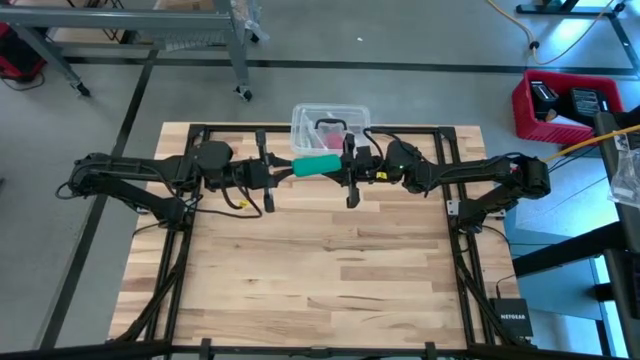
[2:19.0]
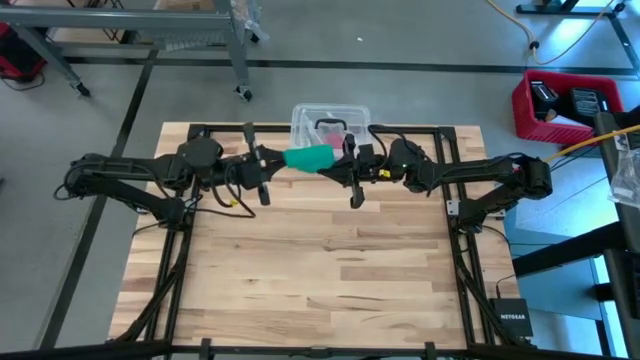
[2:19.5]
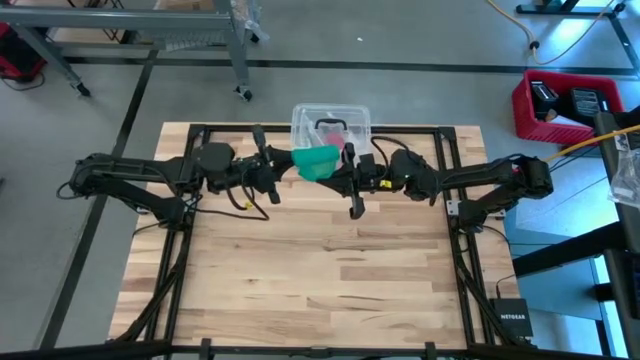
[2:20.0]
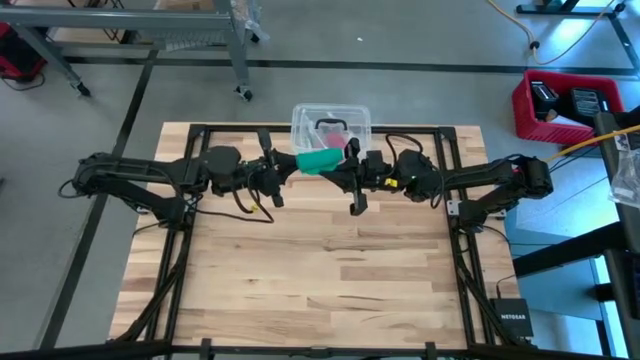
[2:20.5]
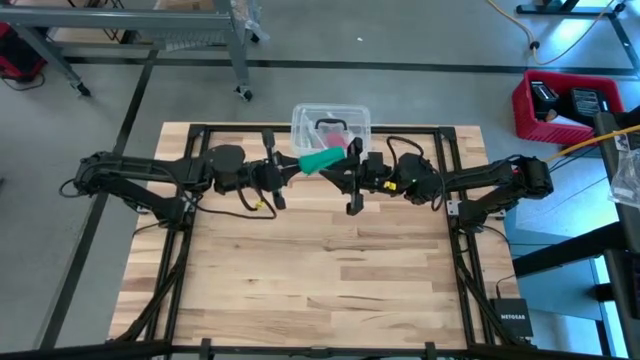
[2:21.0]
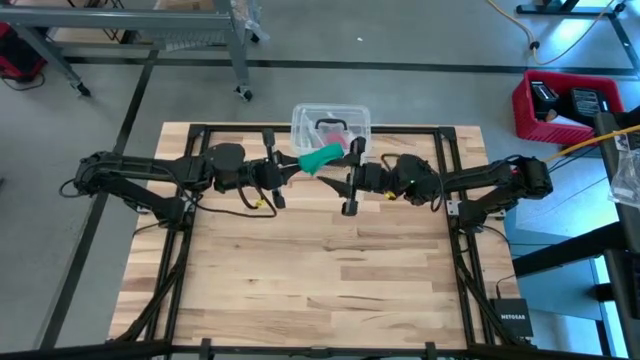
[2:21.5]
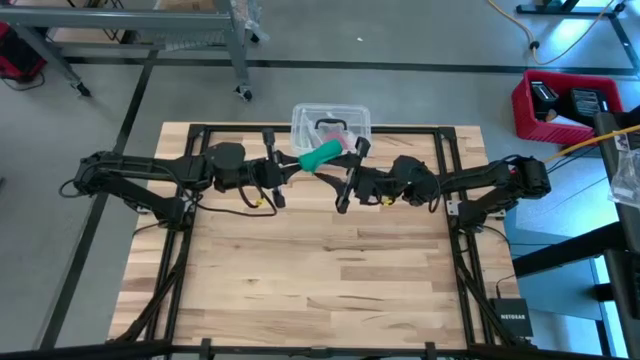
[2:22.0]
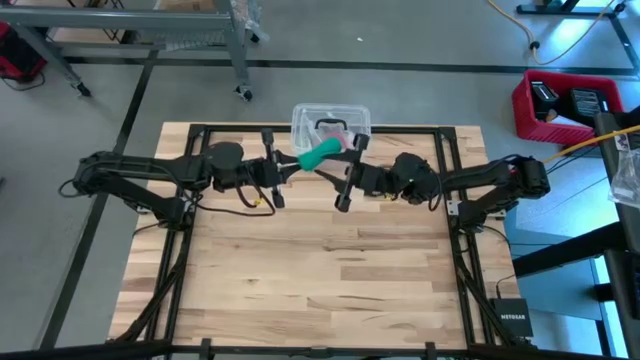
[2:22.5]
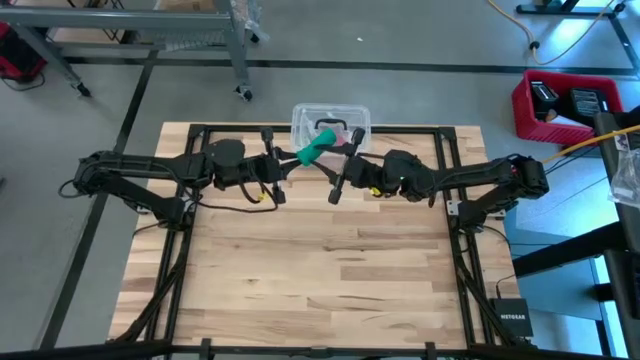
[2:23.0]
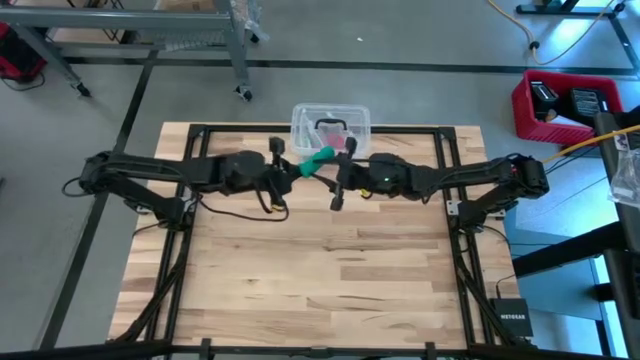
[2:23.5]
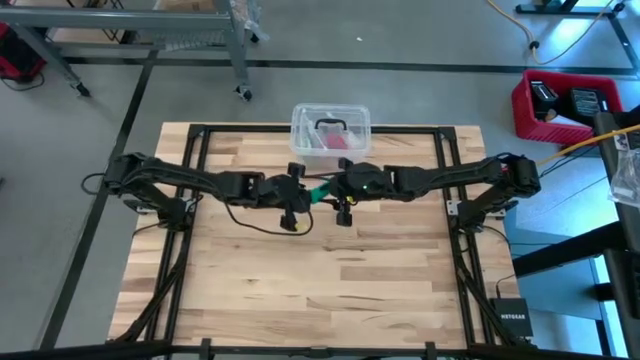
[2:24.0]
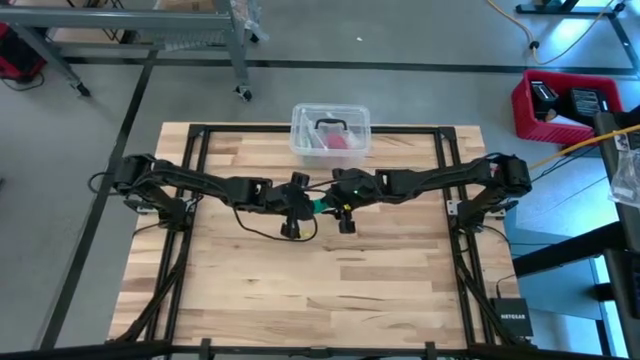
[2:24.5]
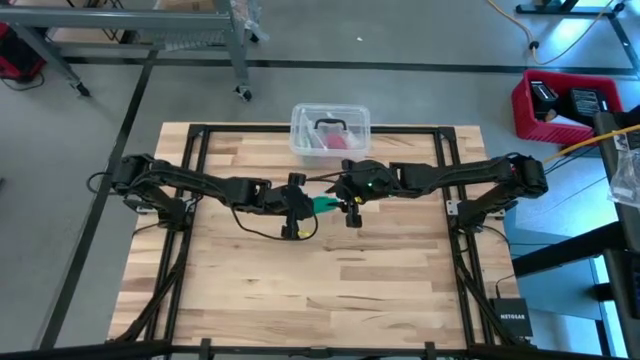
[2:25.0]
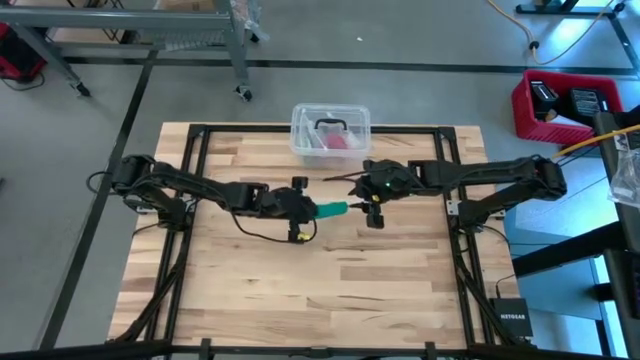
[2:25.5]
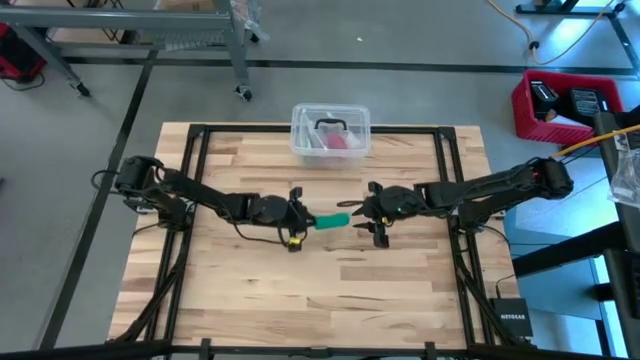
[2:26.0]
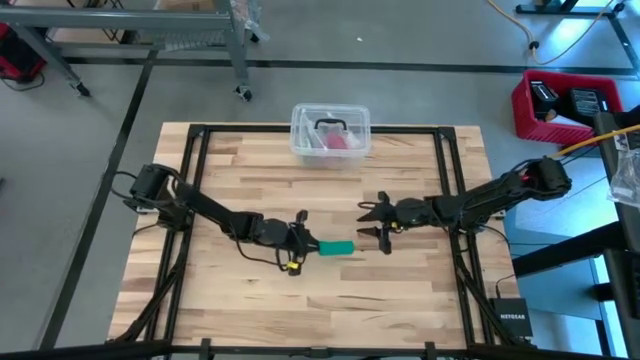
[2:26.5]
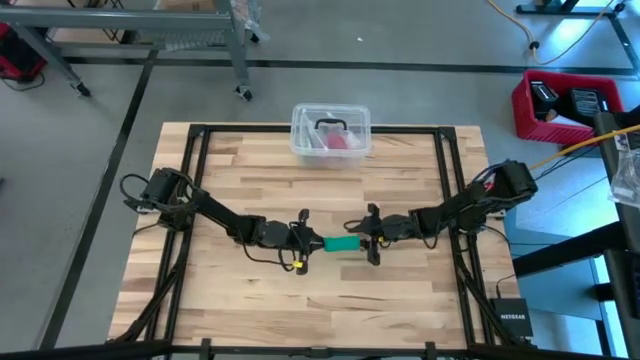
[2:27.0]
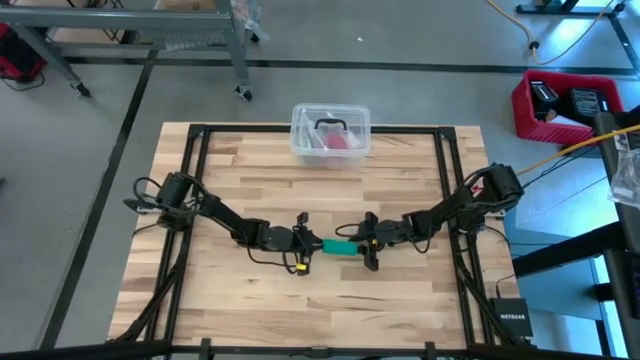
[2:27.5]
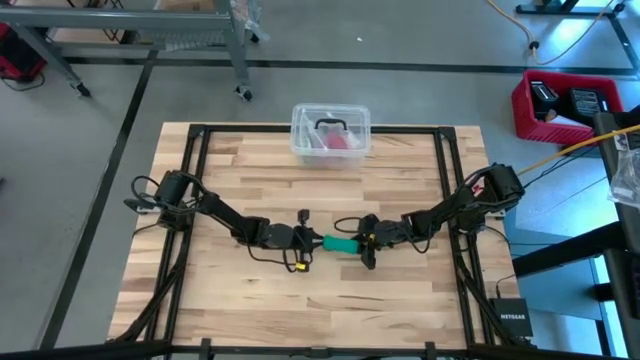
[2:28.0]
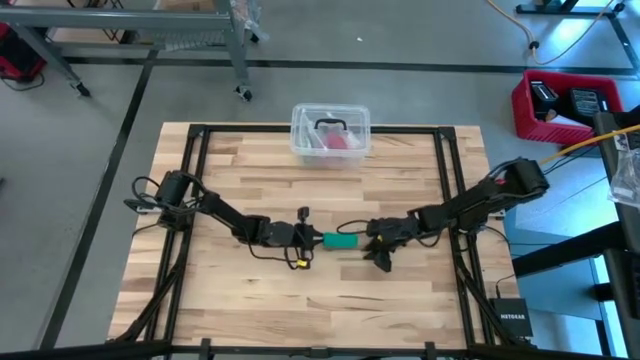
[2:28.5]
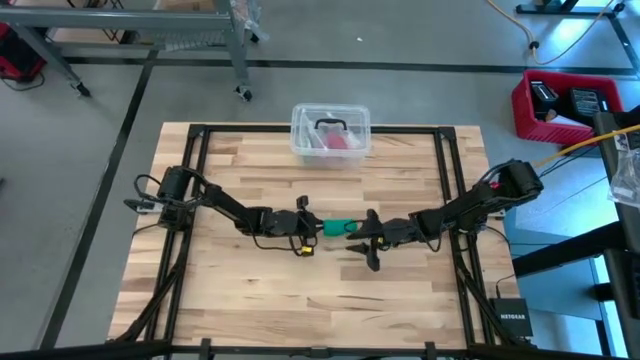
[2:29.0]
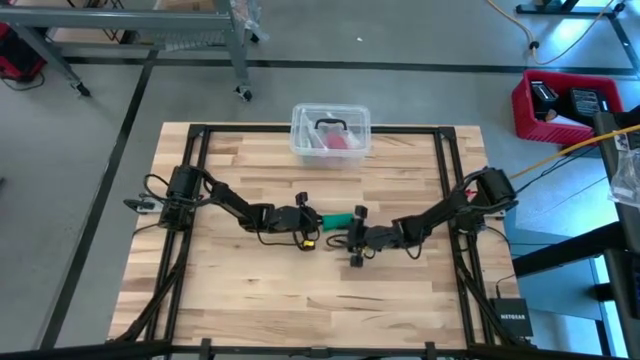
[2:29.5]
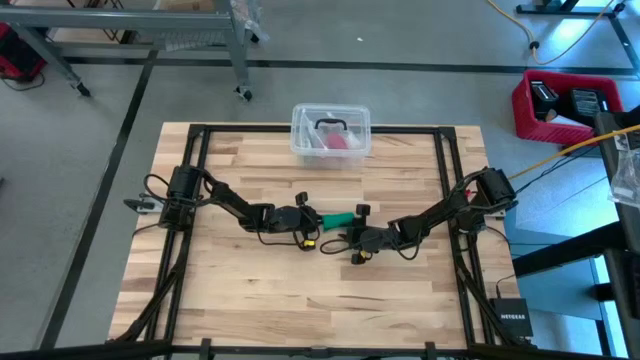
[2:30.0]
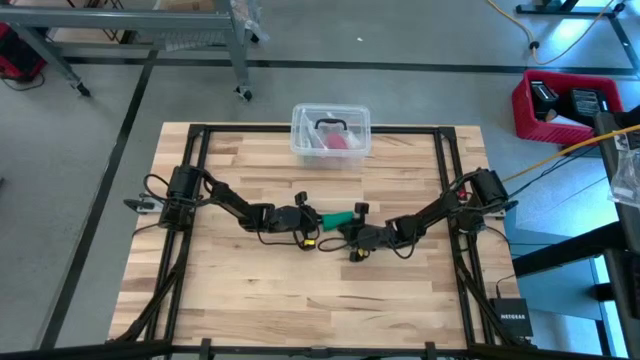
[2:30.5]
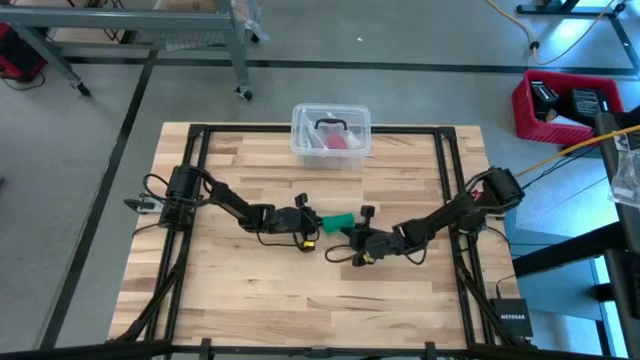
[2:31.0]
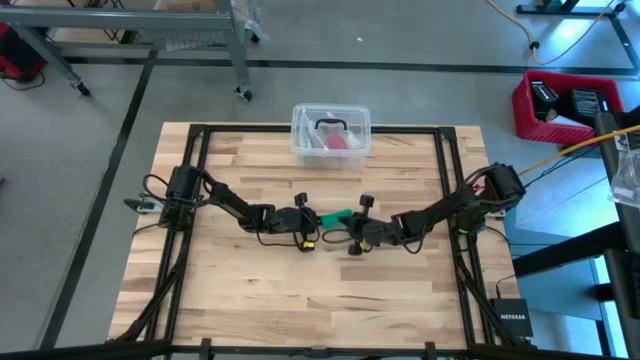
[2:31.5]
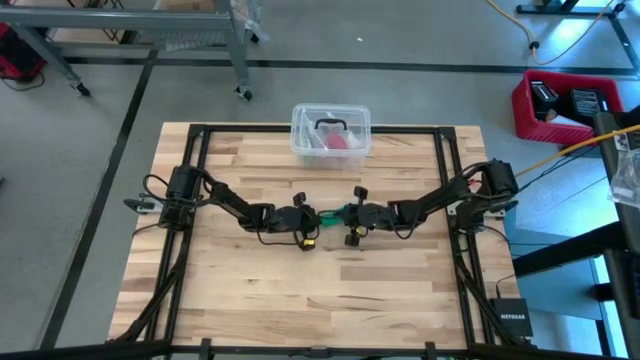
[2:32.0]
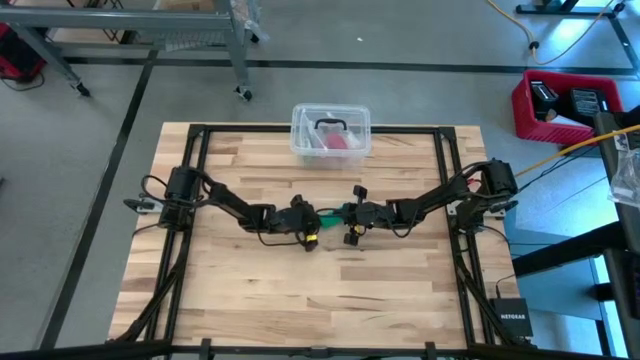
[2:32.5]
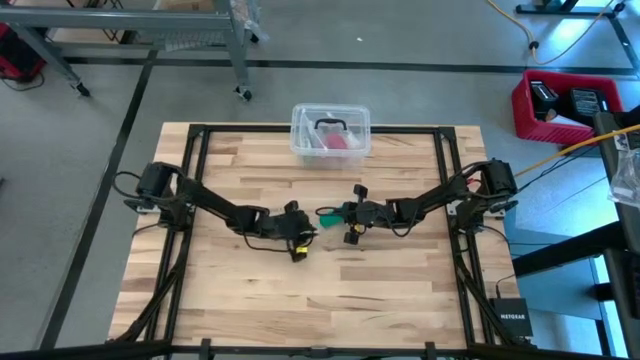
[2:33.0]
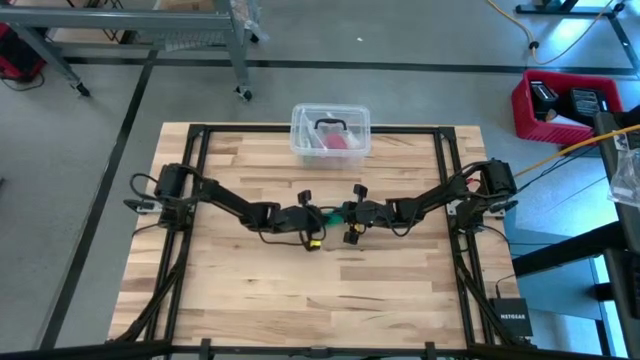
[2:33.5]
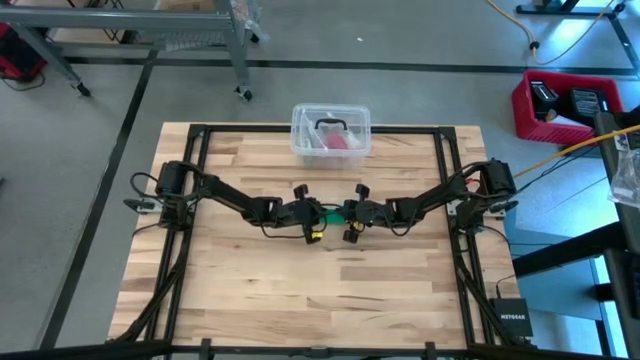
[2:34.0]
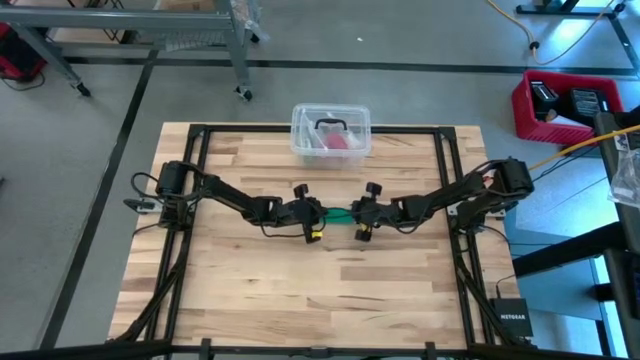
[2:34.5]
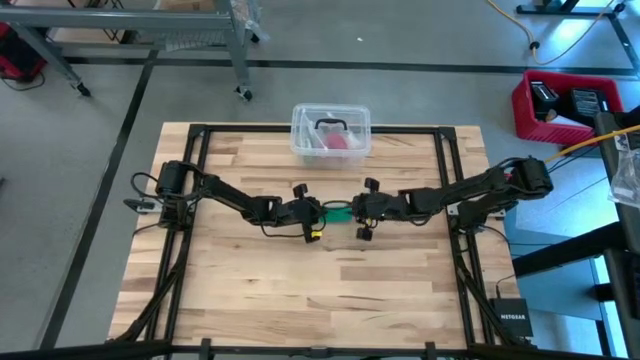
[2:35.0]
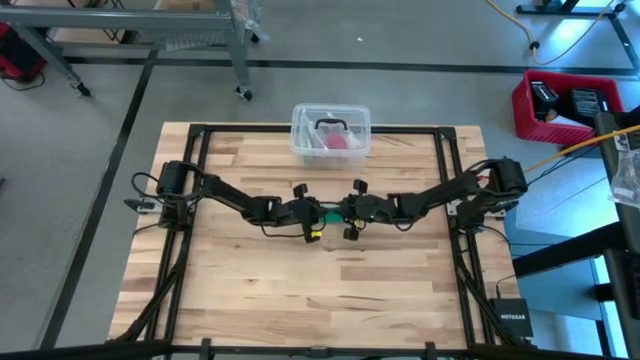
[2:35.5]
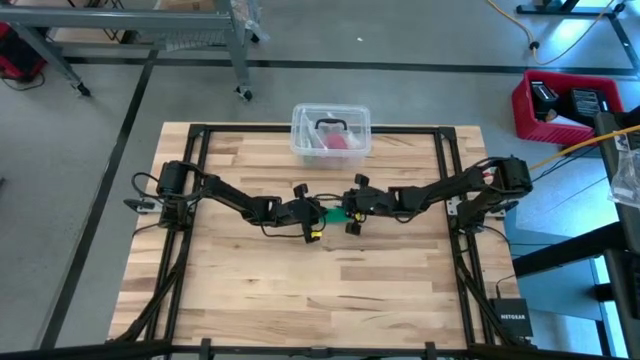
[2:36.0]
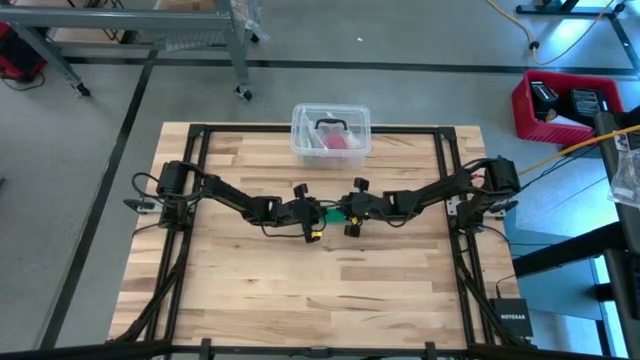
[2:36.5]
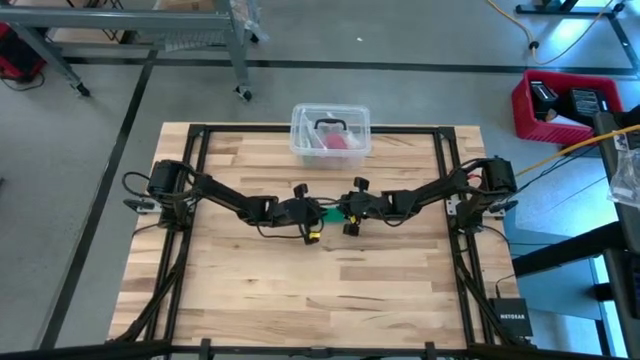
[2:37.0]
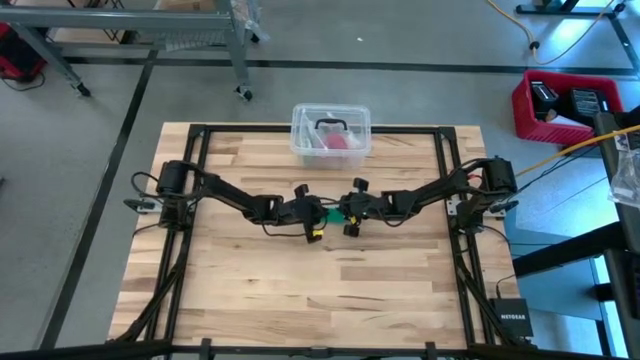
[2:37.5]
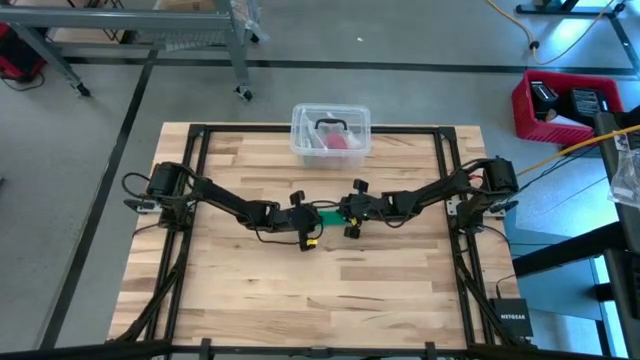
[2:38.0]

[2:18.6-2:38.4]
Task: Roll bandage
Roll the green bandage

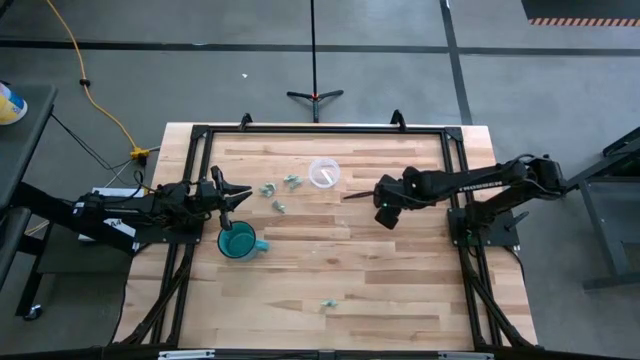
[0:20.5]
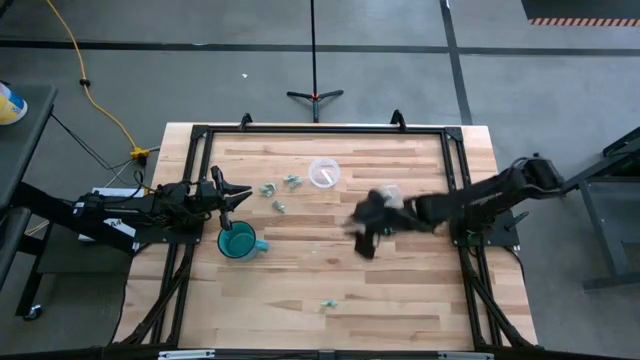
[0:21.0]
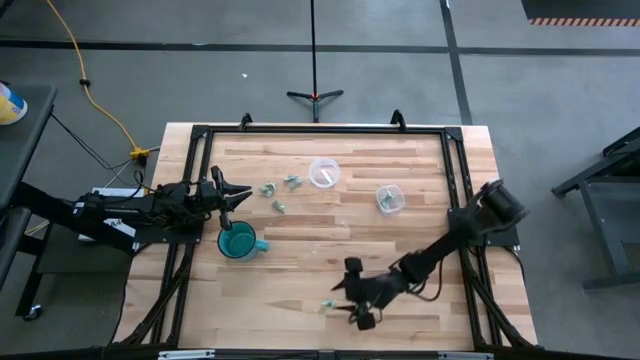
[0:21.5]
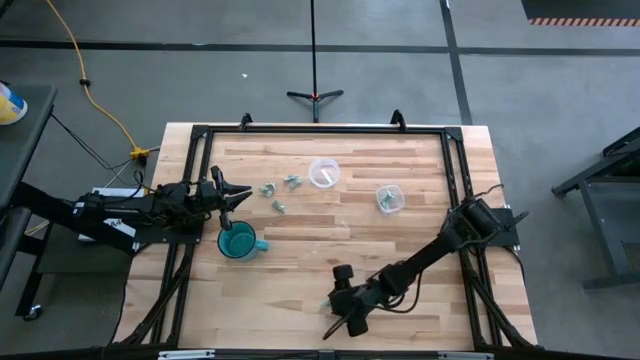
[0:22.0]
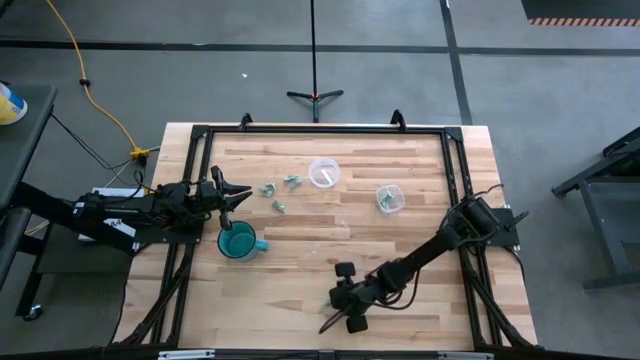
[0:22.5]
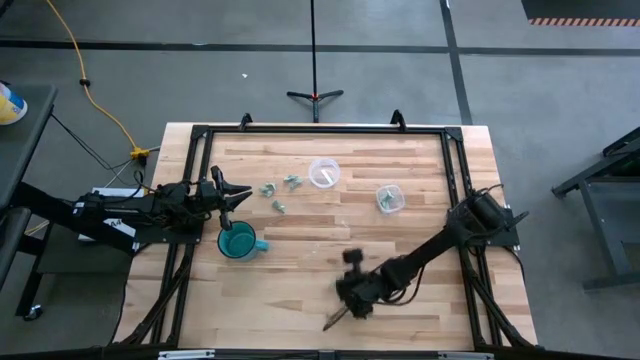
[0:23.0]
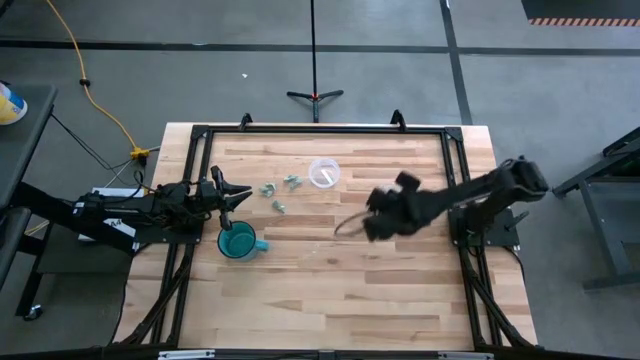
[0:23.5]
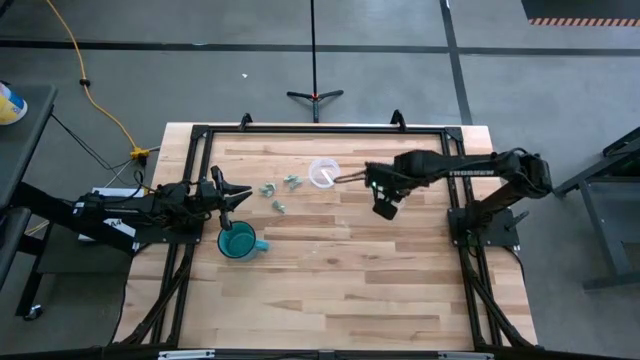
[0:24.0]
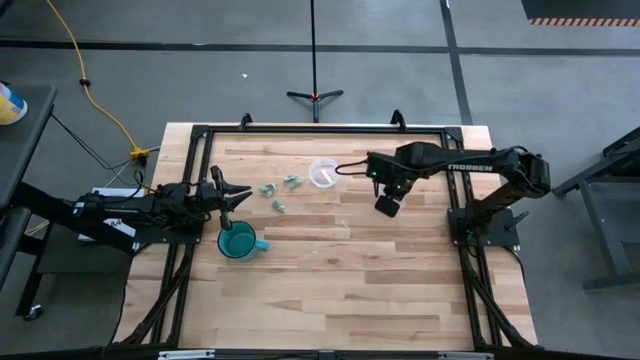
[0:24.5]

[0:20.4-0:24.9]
Task: Pick and place items into bin
Put the stevia packet into the bottom transparent bin
